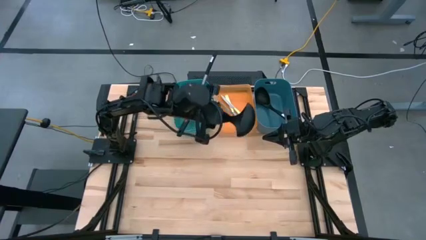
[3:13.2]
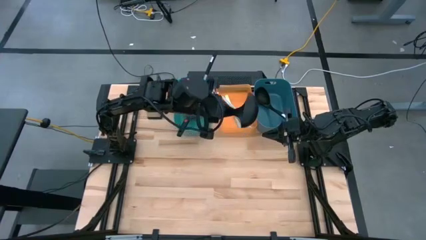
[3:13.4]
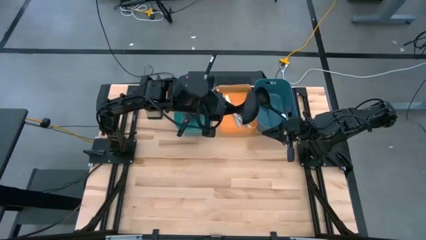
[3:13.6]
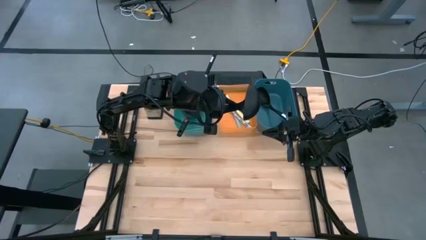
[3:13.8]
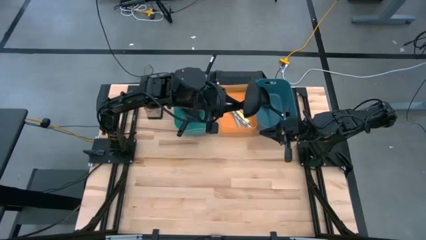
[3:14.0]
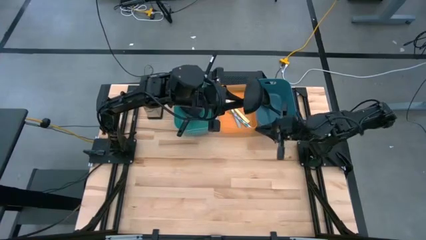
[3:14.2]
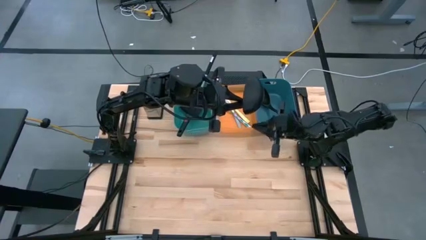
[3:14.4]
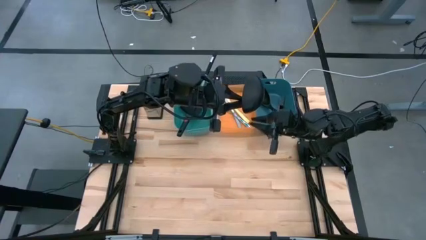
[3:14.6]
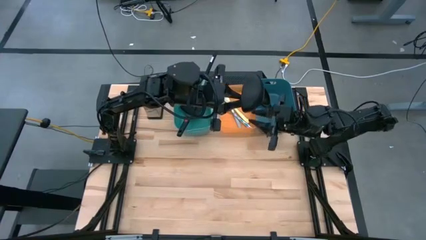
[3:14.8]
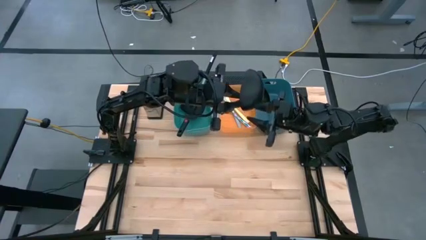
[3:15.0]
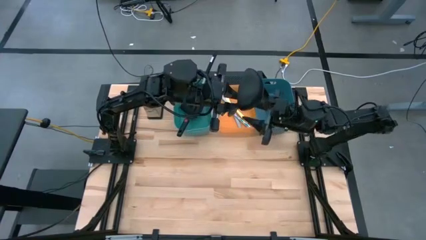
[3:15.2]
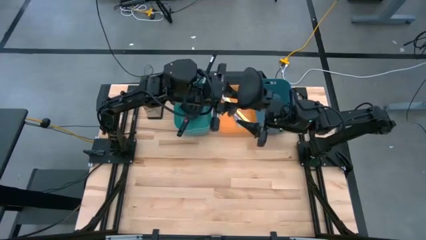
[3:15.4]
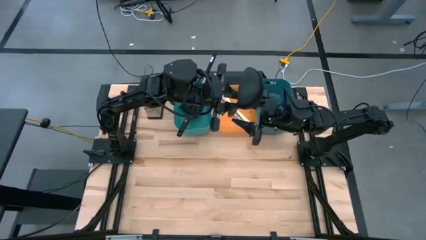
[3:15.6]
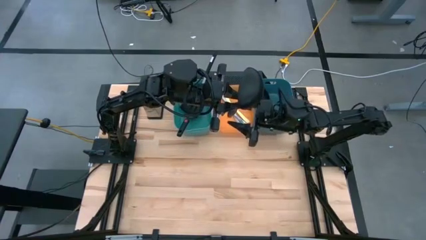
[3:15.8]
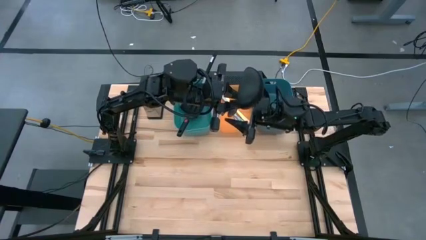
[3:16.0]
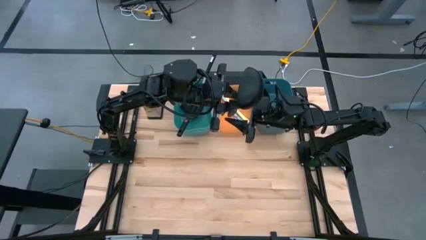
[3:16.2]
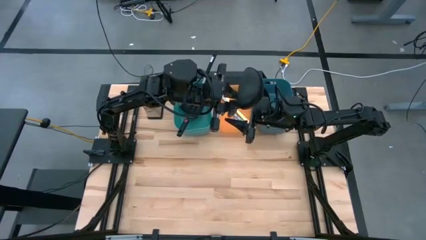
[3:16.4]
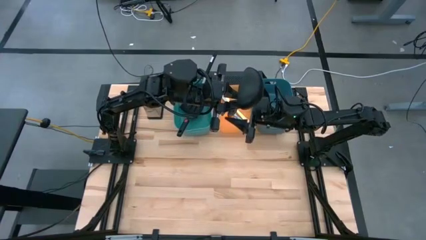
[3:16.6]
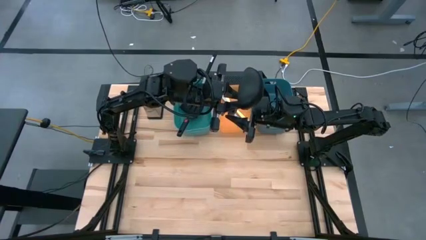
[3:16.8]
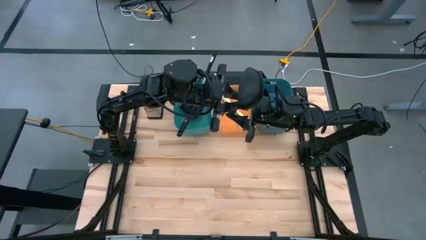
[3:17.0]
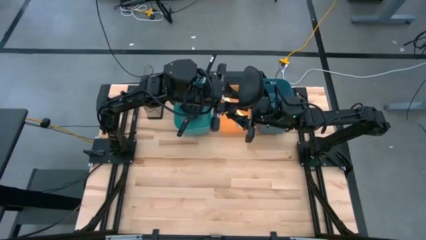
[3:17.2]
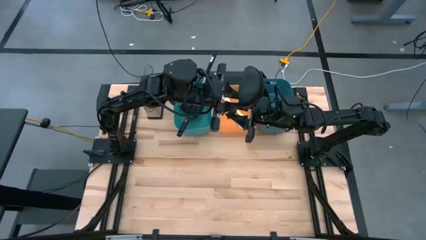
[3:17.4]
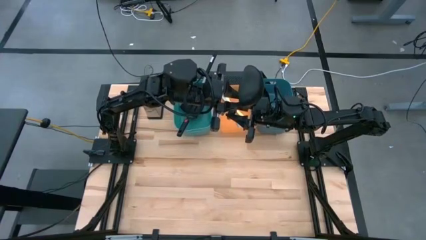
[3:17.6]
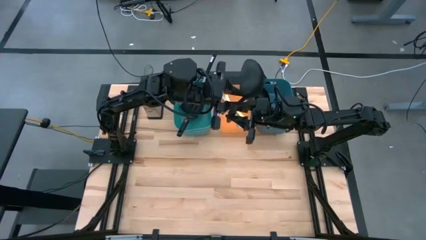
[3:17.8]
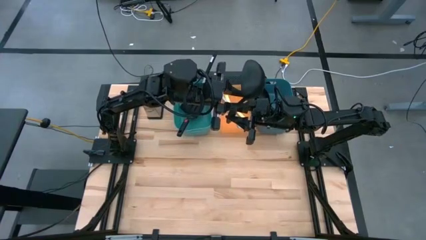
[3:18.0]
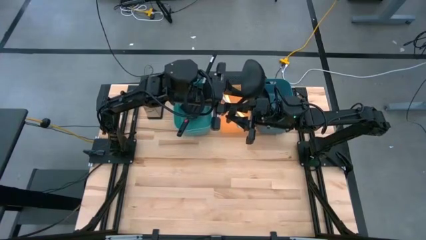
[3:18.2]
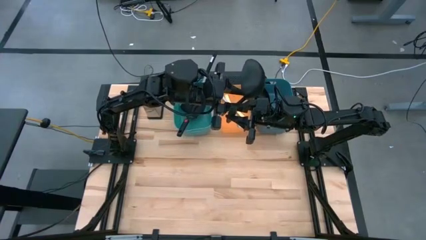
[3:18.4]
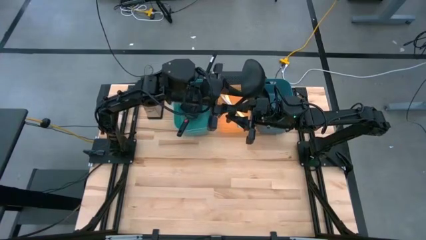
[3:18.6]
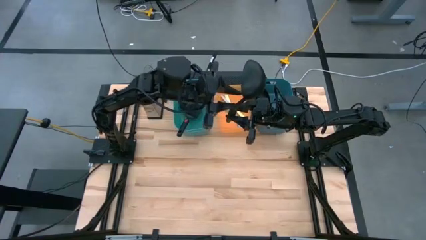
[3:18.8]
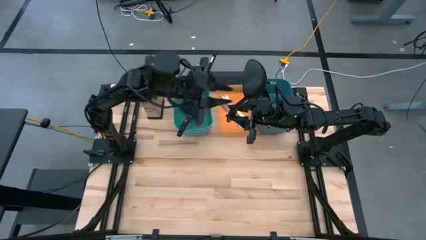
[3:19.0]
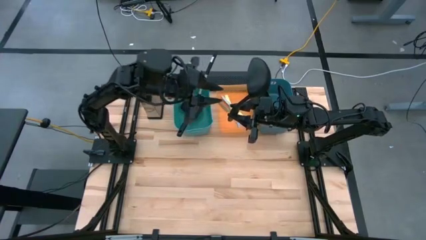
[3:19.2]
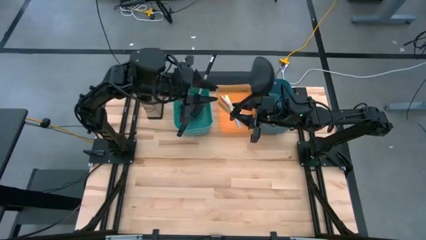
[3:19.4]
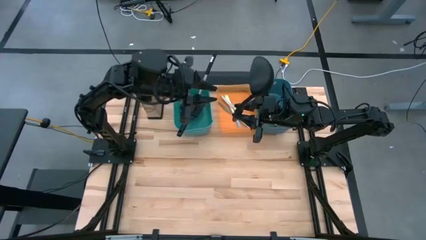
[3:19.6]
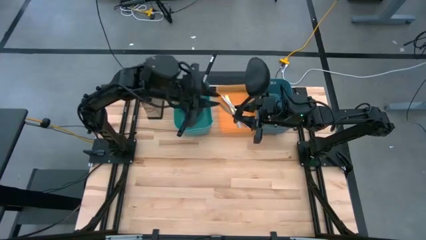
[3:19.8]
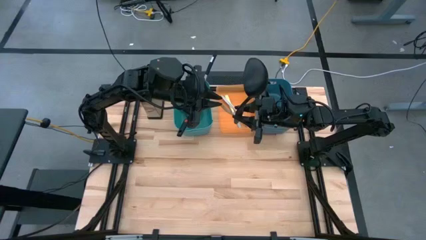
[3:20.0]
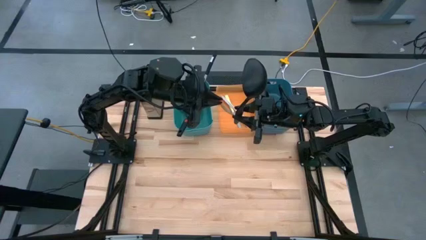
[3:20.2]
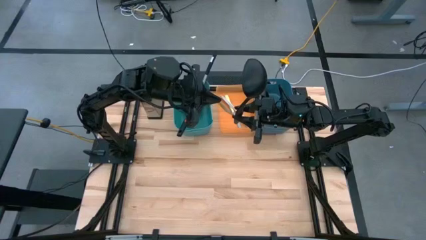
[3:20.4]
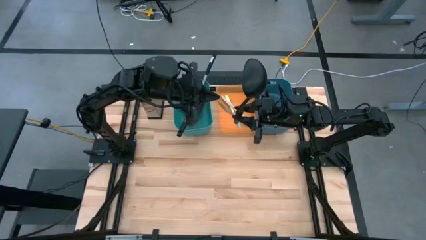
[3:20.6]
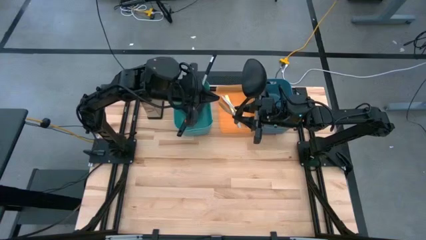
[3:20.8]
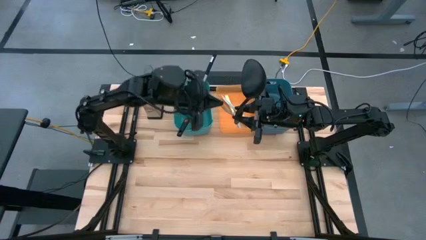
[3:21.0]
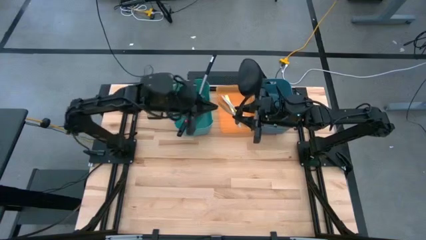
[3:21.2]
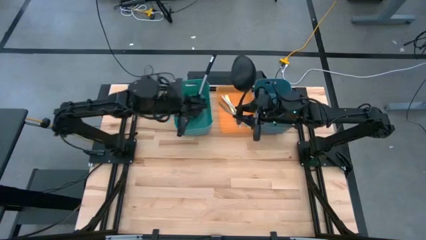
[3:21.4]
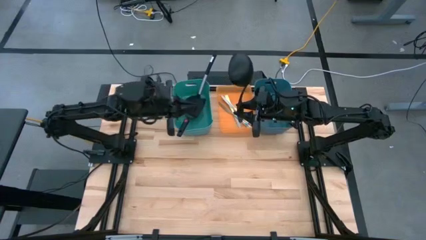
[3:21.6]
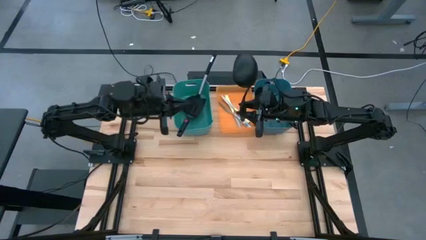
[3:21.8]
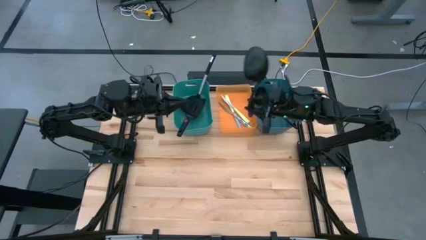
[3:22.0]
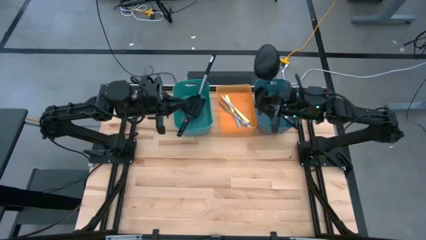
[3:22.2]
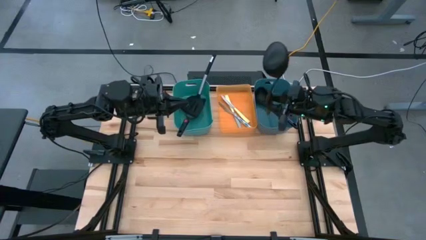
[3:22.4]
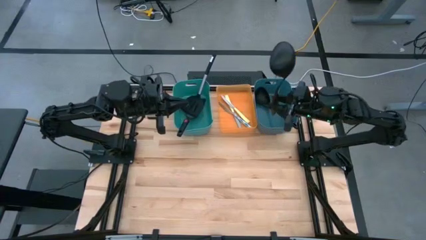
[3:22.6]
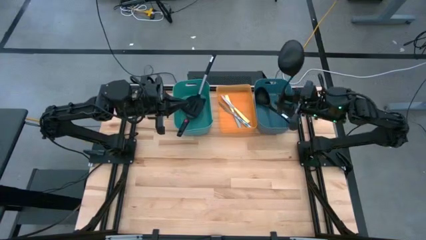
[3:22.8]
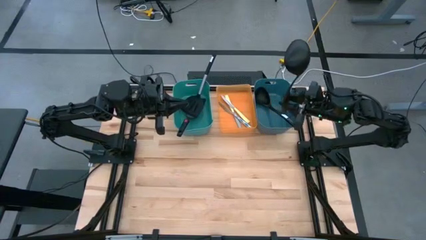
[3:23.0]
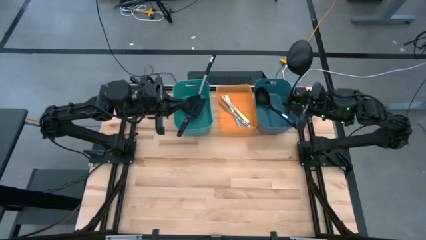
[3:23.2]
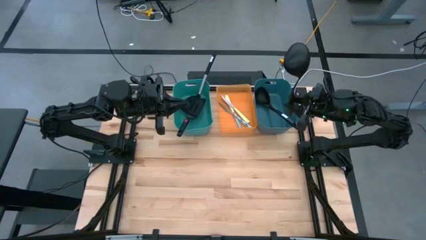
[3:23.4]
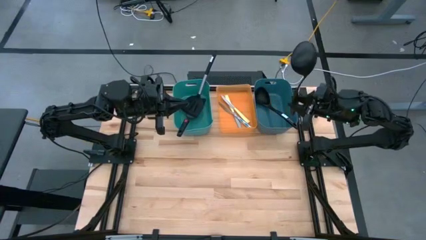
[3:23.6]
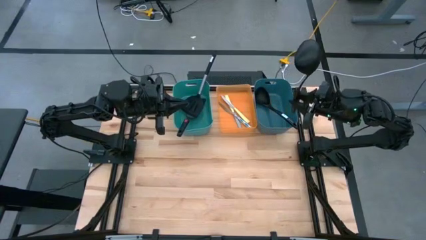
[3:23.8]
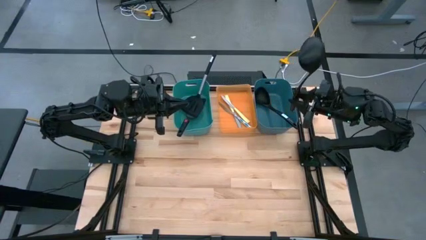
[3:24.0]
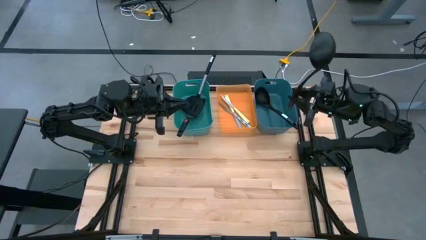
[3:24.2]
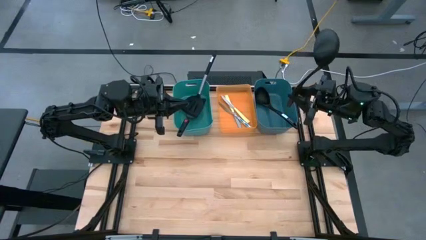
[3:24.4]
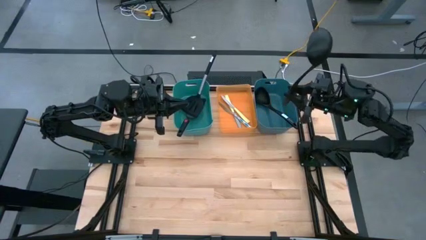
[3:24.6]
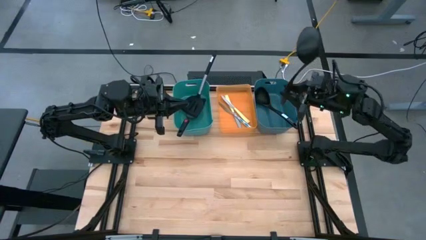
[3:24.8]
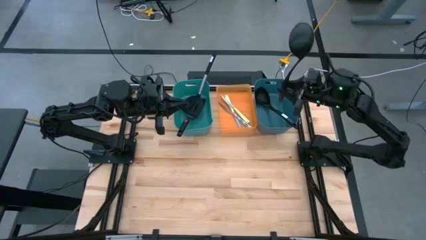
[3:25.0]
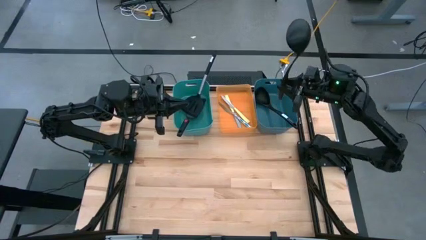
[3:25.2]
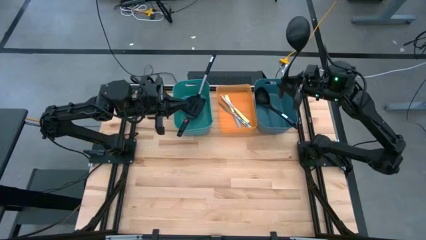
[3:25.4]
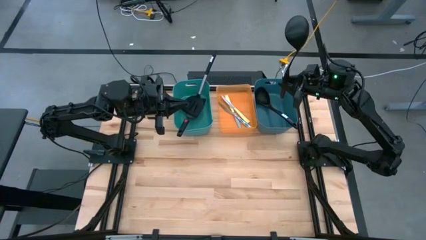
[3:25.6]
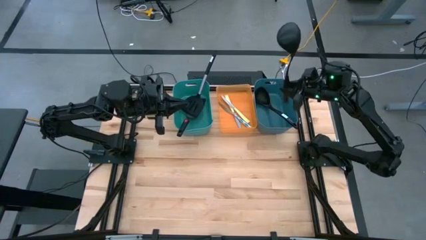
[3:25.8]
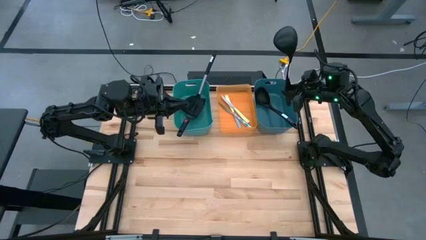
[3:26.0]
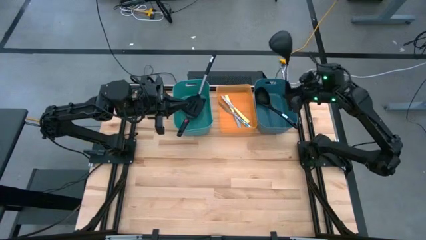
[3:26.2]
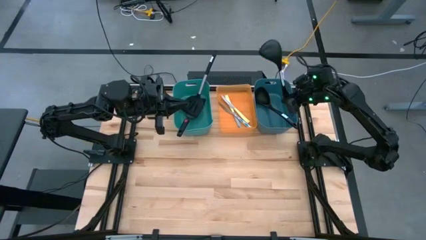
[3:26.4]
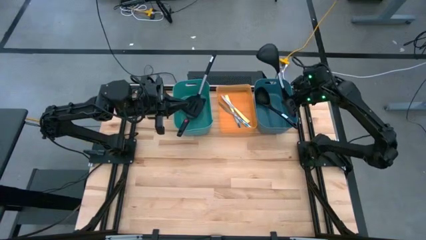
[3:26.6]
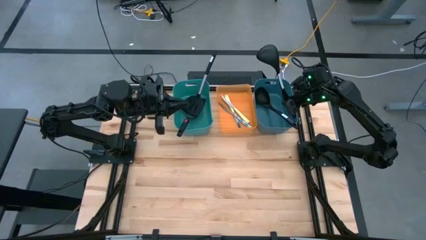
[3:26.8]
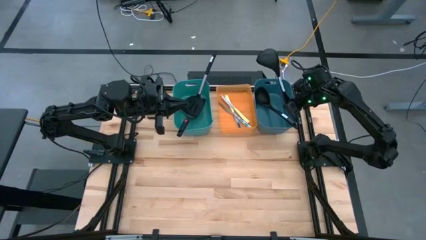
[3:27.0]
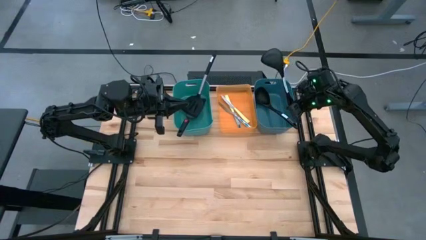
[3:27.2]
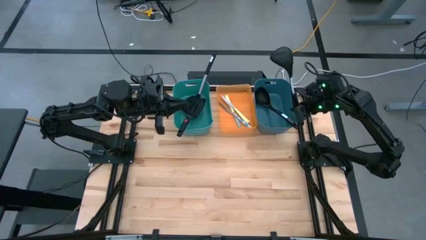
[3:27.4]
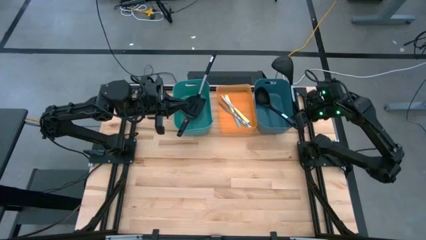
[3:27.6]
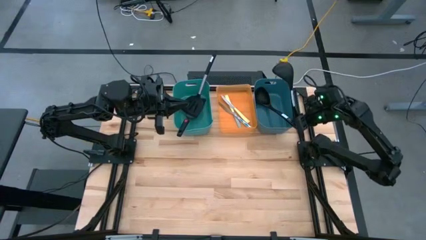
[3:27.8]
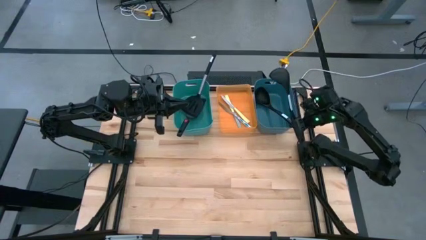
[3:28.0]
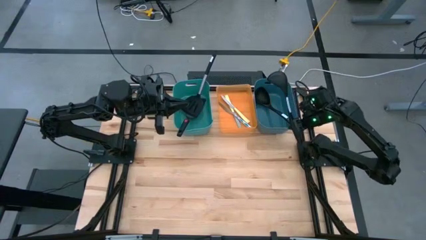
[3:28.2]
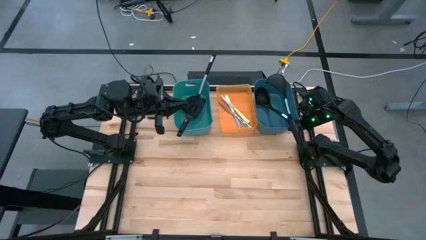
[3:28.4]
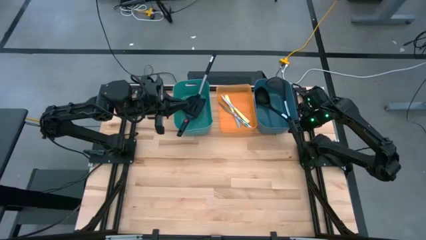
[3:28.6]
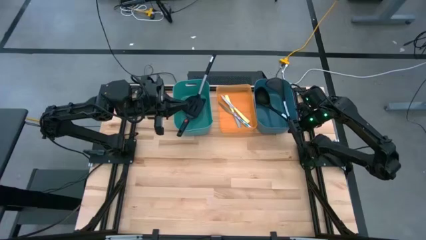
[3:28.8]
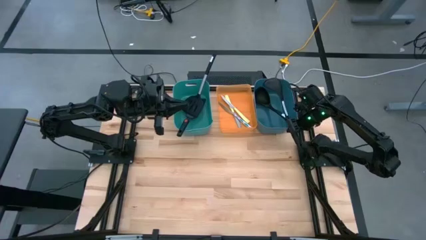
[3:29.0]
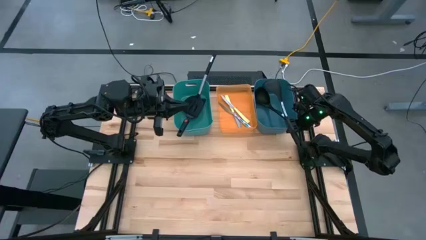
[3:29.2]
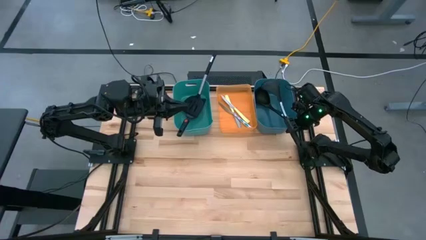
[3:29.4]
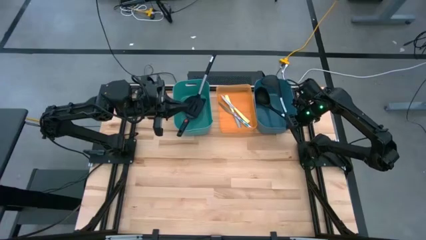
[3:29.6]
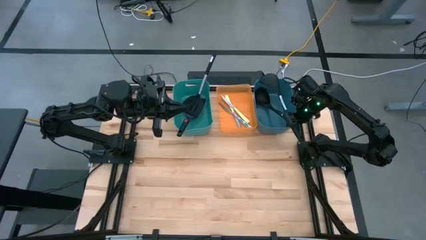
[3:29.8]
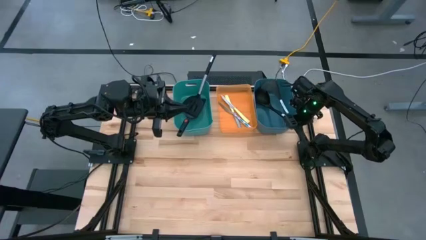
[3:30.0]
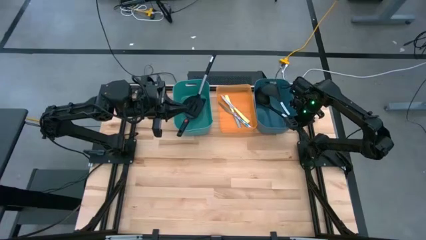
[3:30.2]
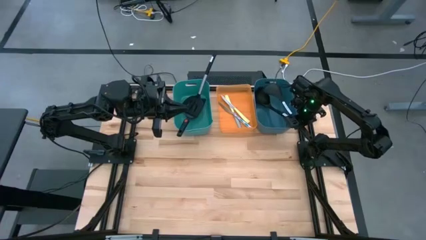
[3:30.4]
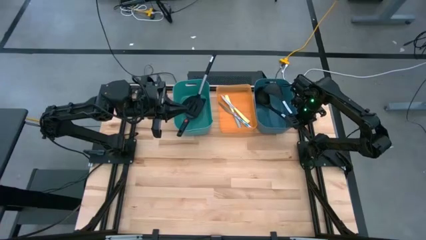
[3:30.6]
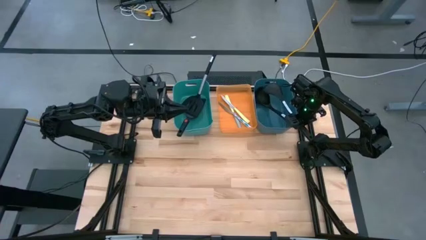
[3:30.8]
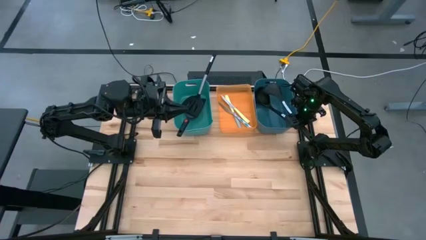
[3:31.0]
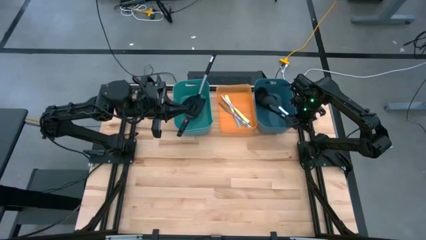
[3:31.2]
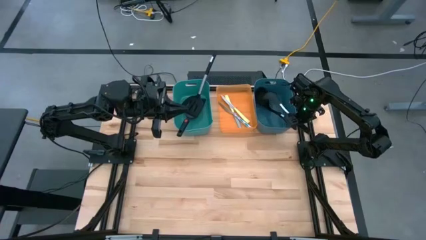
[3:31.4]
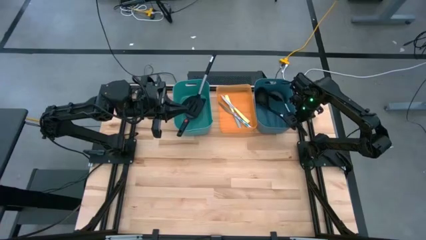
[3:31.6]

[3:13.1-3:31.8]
Task: Pick & Place Kitchen Items
Put the black ladle into the blue bin
